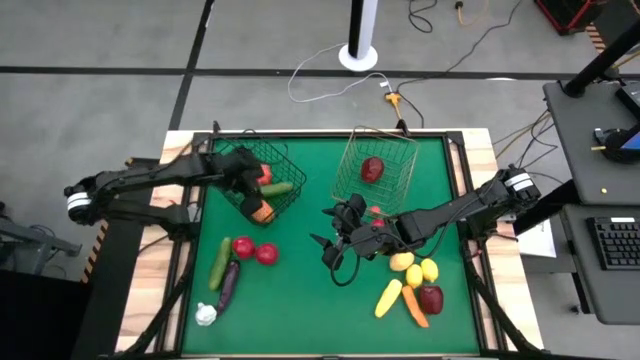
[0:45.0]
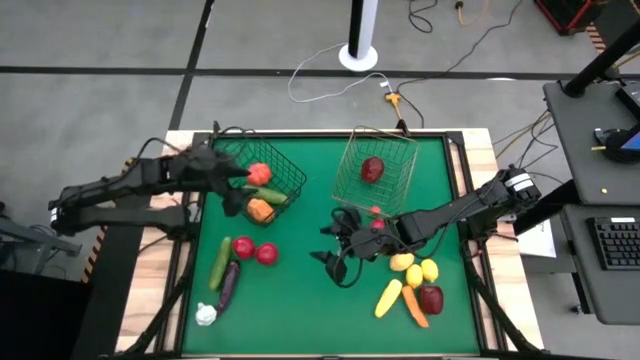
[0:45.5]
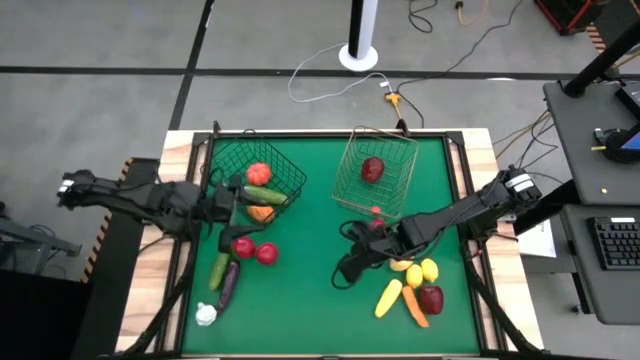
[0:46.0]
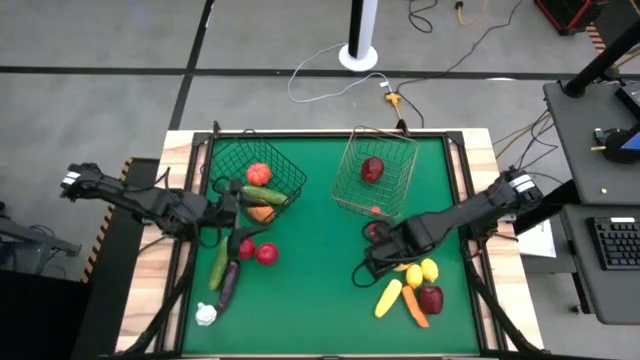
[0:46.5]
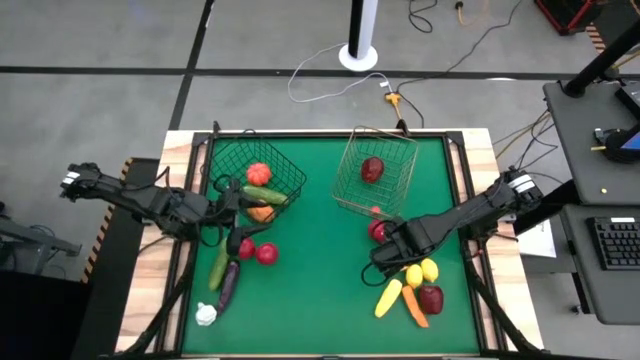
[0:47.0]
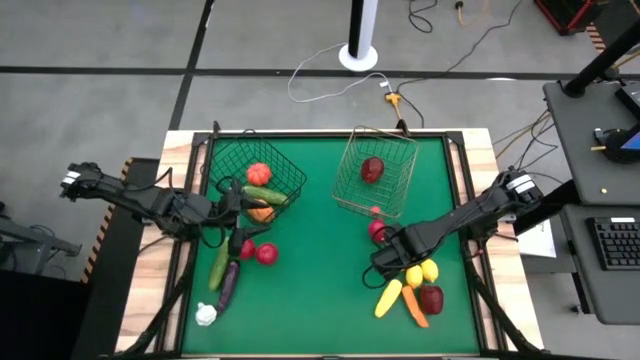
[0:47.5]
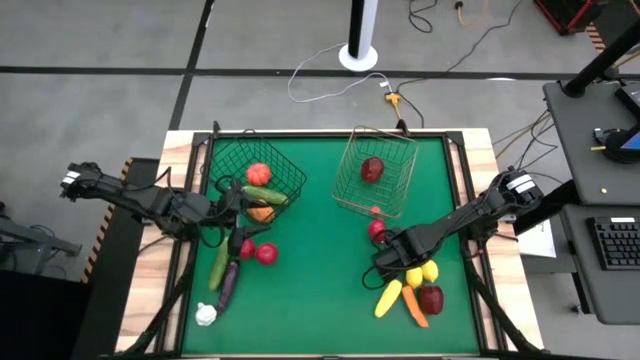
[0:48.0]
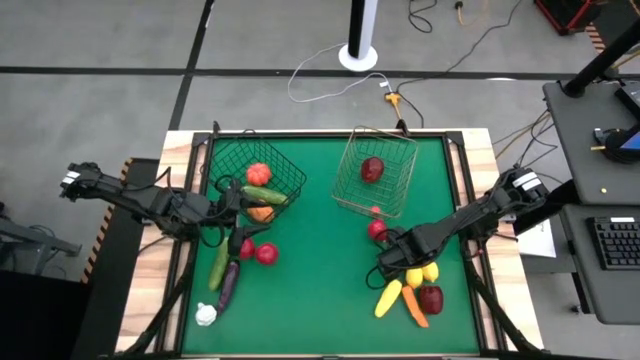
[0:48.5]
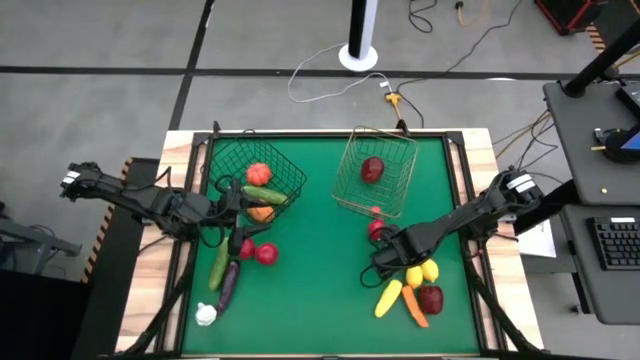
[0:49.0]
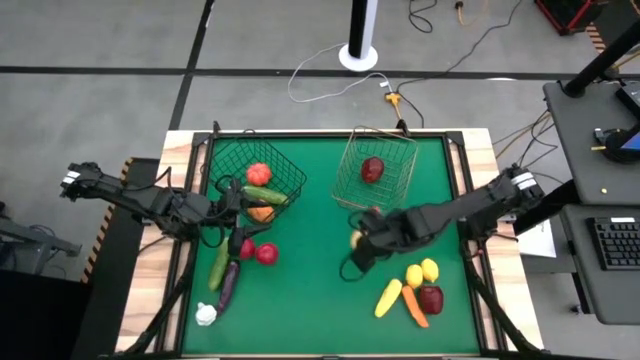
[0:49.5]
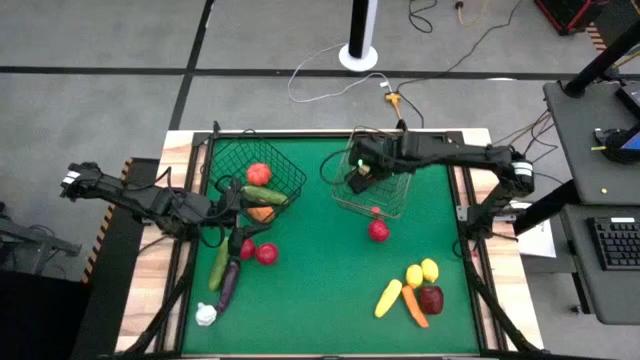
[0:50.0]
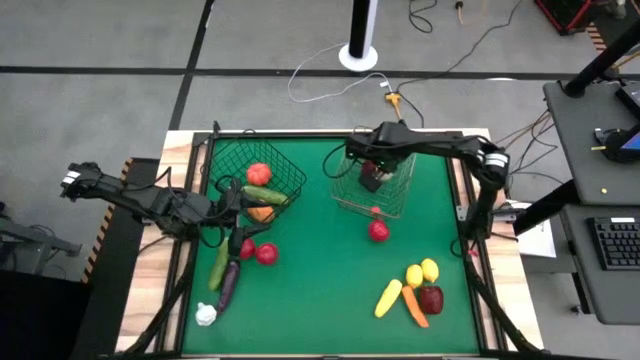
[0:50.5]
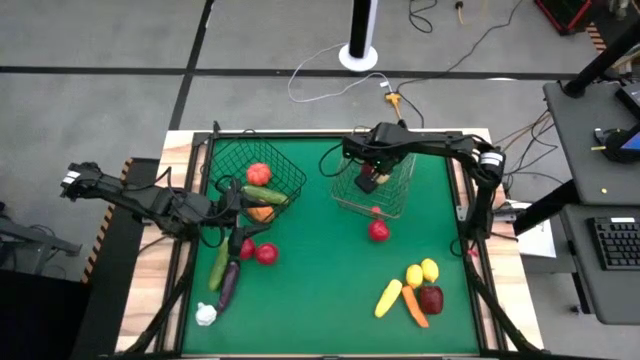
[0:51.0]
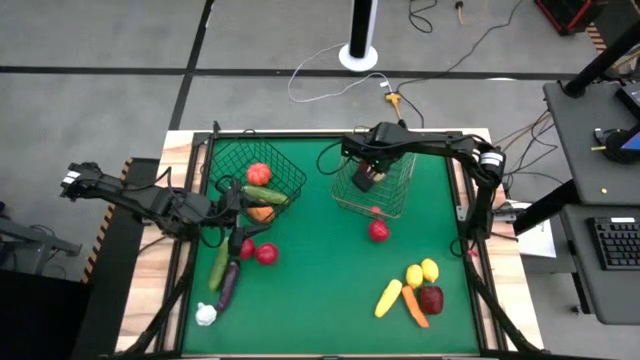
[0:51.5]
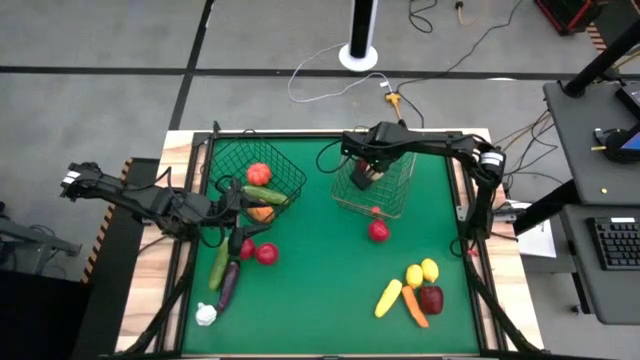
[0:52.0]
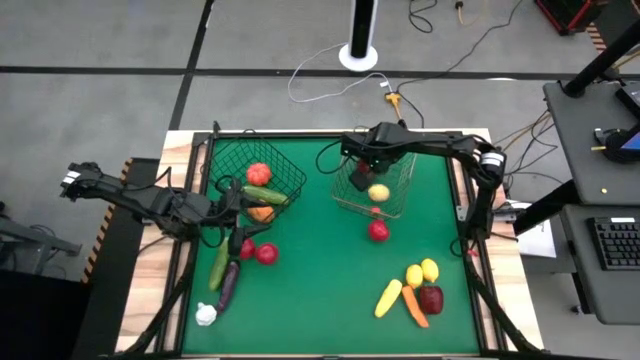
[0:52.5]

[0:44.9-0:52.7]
Task: Sort produce into baskets
Put the left yellow lemon into the gold wire basket

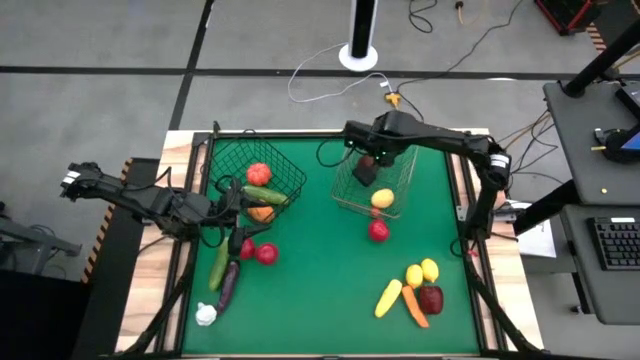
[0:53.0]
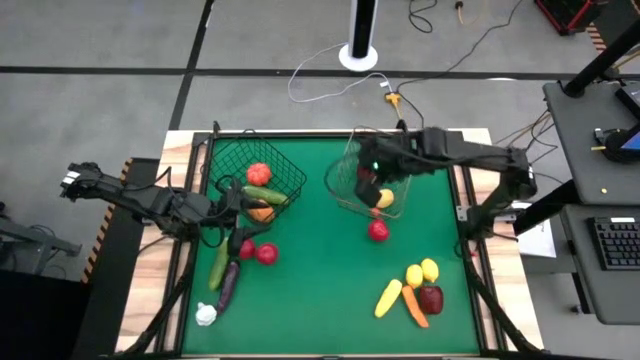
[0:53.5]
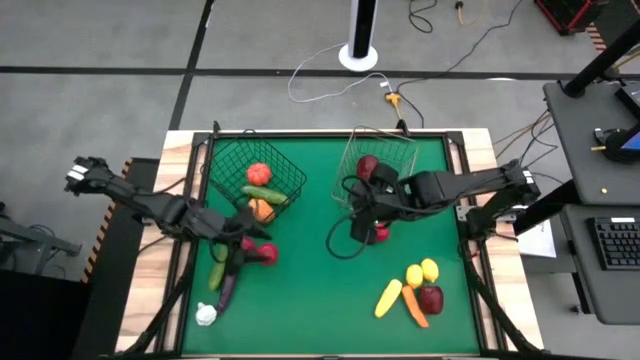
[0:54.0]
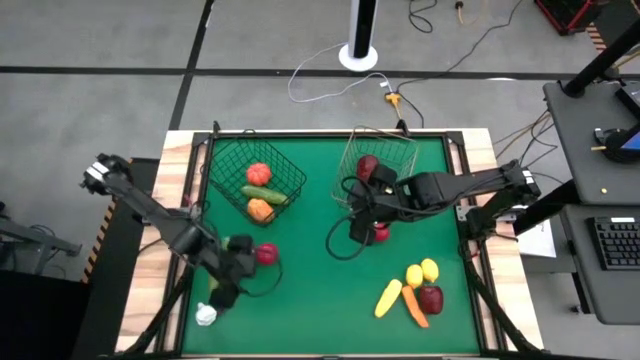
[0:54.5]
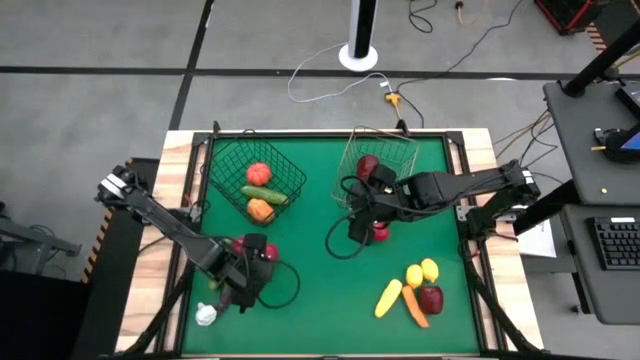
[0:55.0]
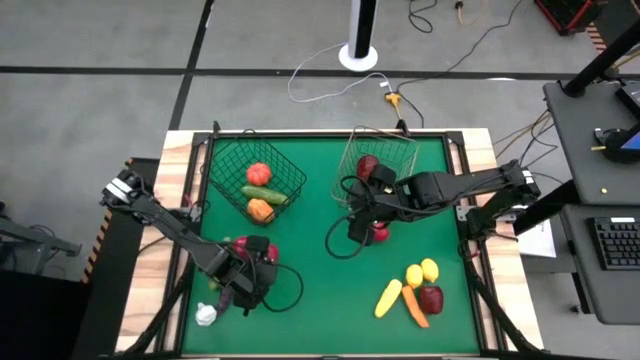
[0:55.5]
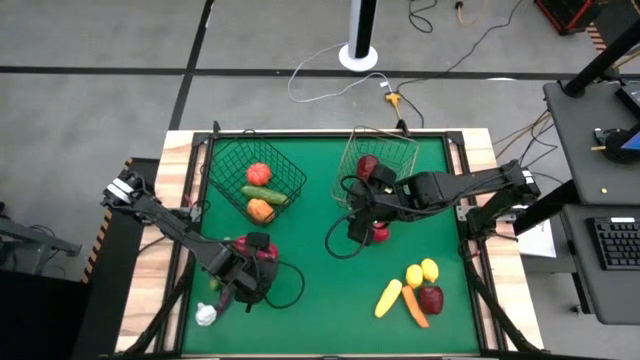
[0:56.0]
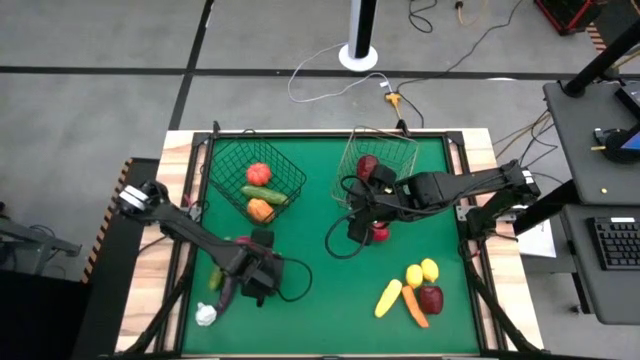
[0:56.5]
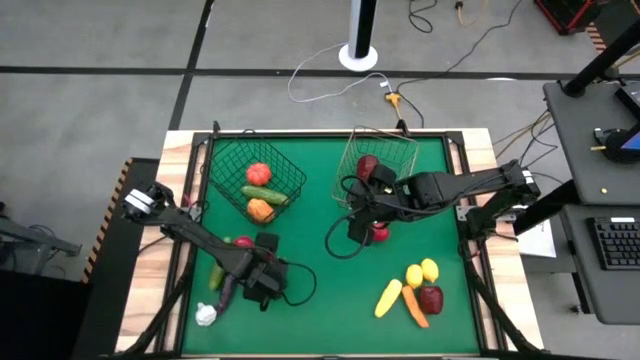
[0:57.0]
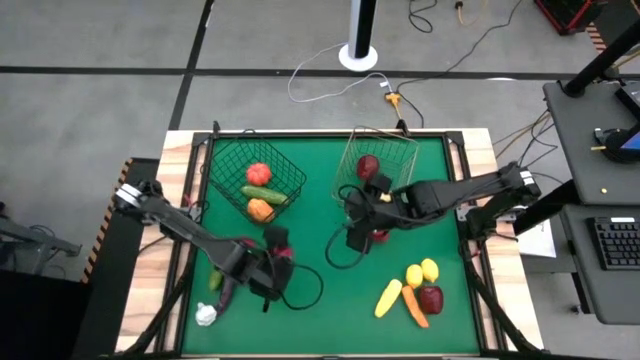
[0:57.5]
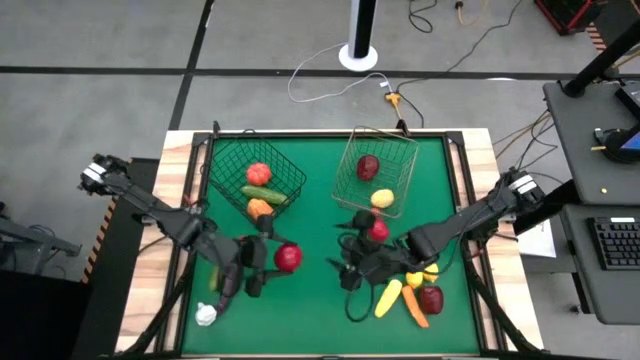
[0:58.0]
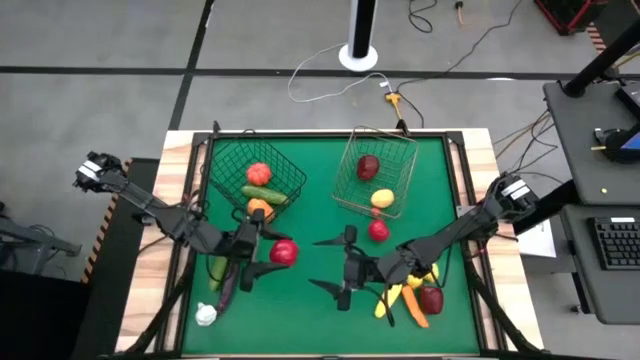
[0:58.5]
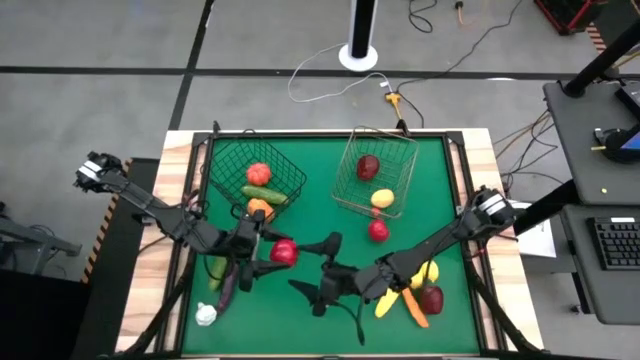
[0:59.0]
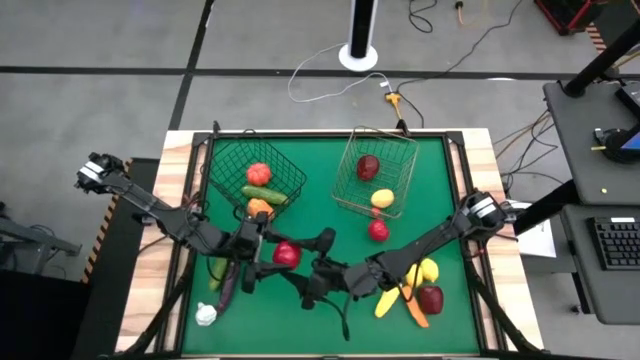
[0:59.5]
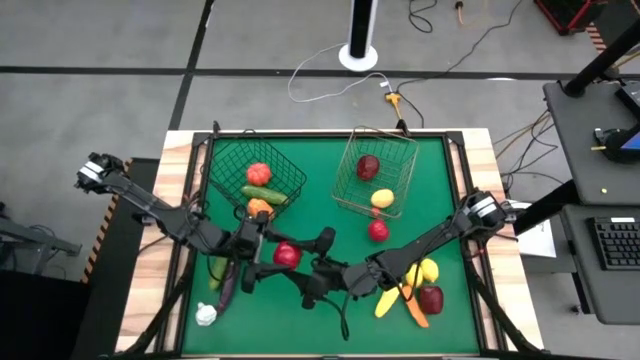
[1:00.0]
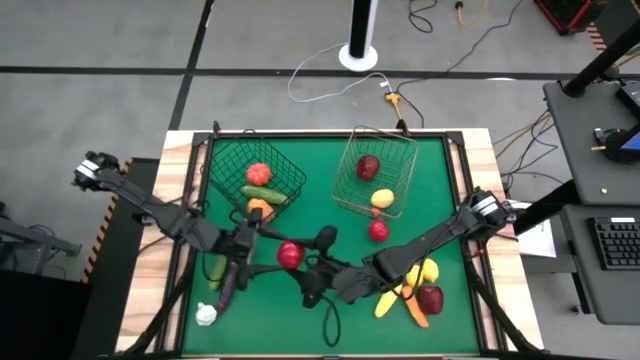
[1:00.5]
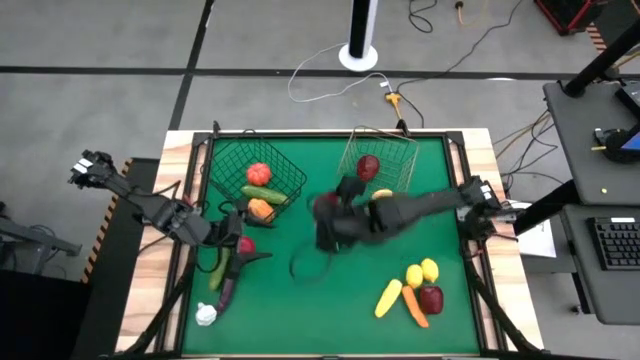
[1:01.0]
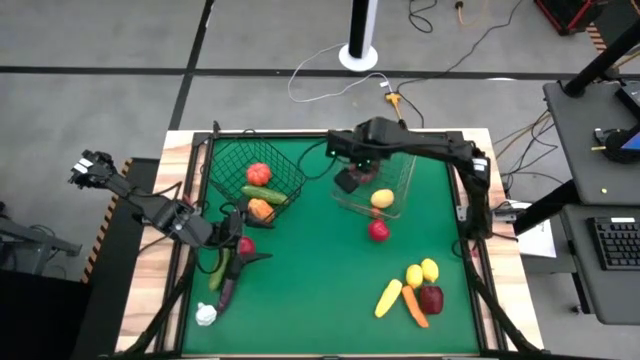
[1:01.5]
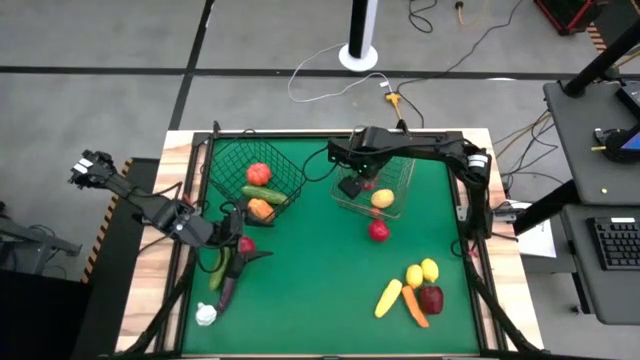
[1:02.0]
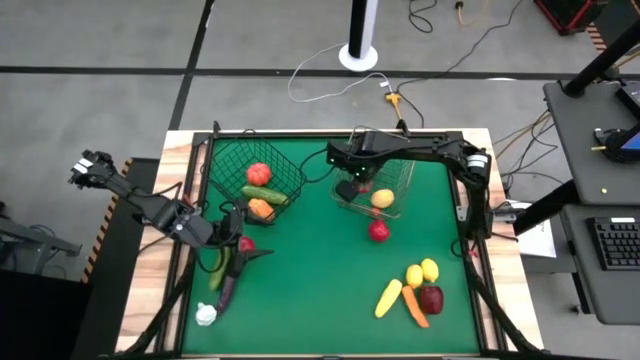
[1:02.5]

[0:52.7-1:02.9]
Put the middle red tomato into the gold wire basket

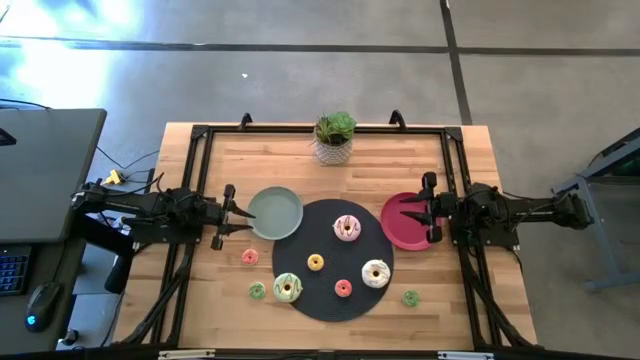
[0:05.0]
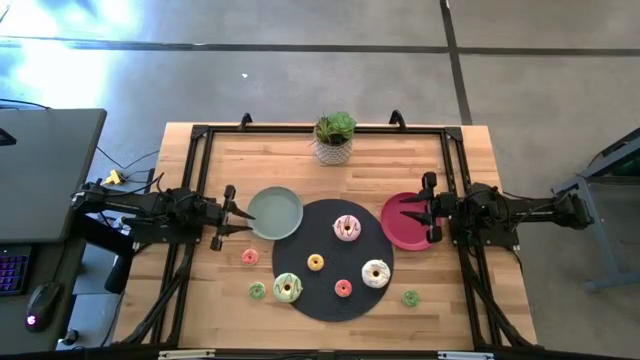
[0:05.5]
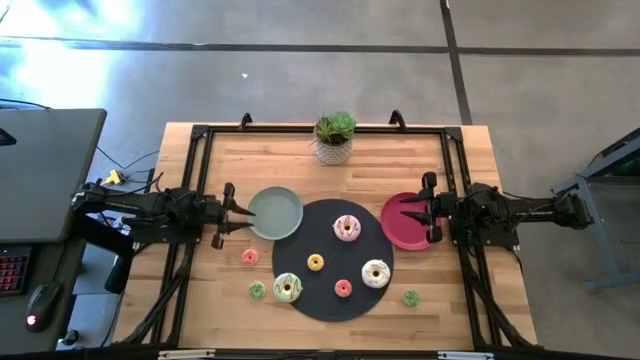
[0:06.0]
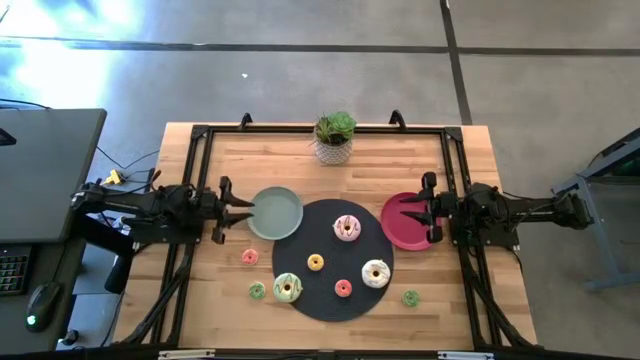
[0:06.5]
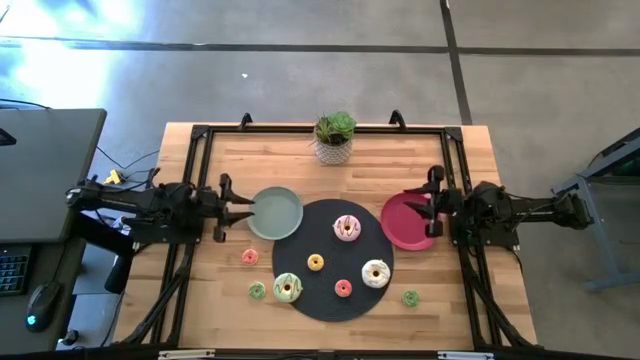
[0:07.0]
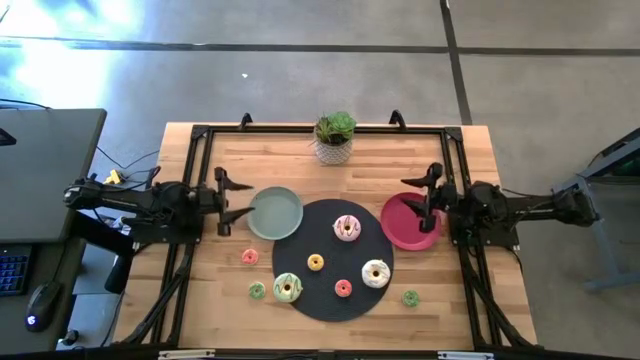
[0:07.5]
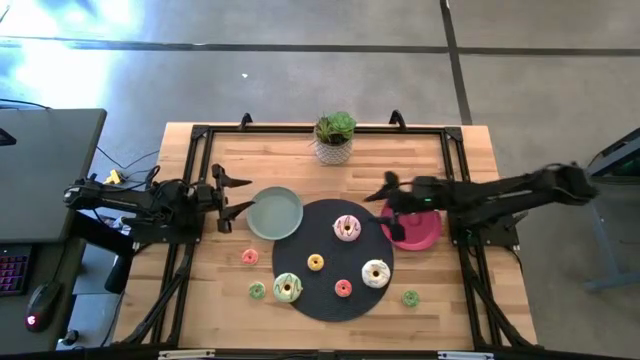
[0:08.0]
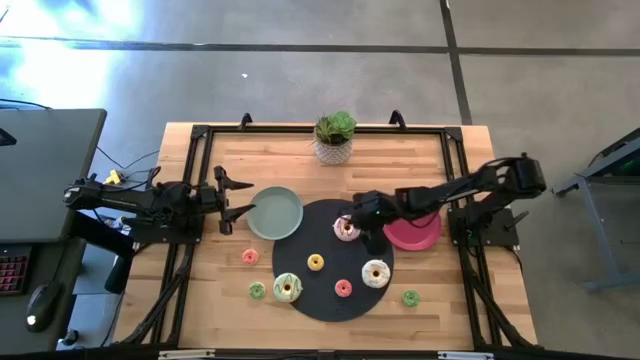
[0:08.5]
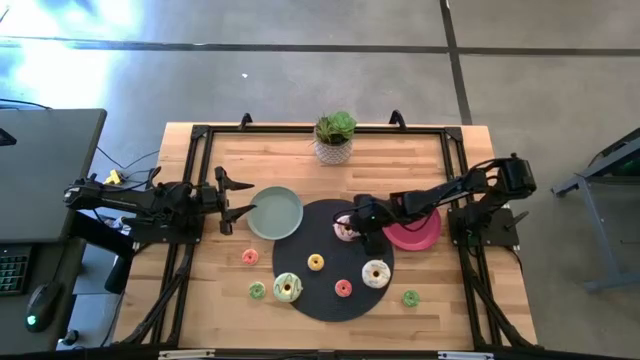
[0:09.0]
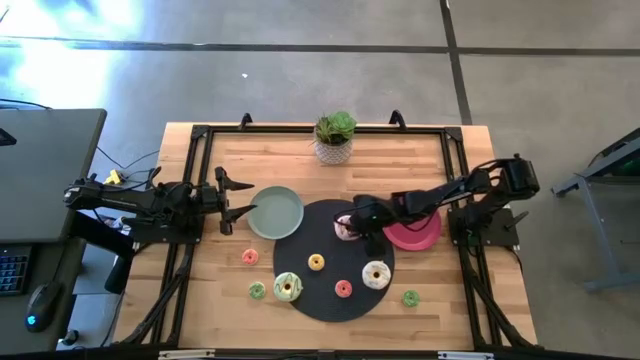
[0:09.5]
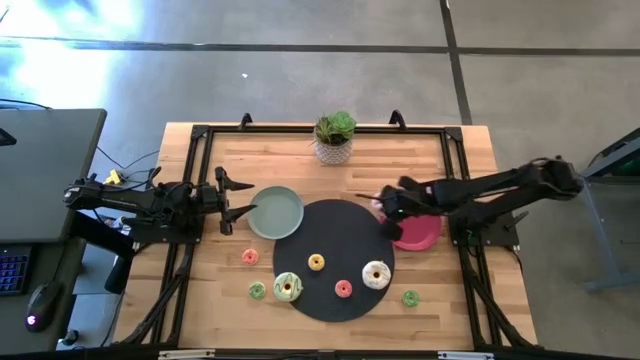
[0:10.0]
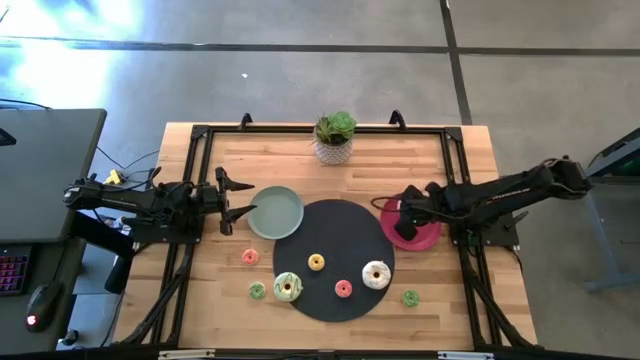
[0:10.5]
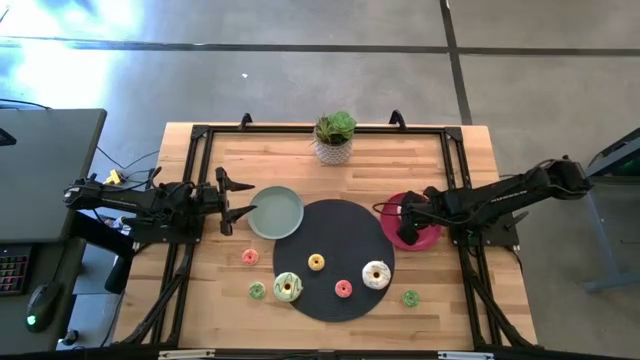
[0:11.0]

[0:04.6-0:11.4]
Task: Pick & Place donuts
Put the large purple donut on the red plate
